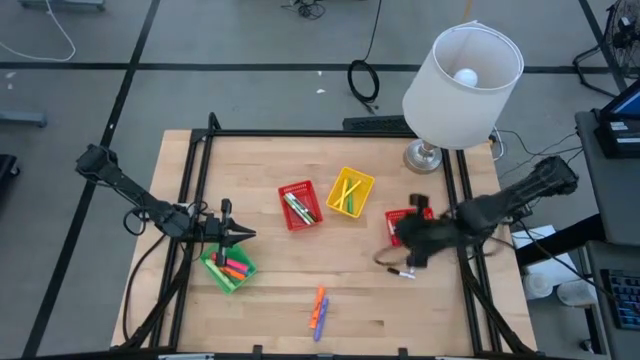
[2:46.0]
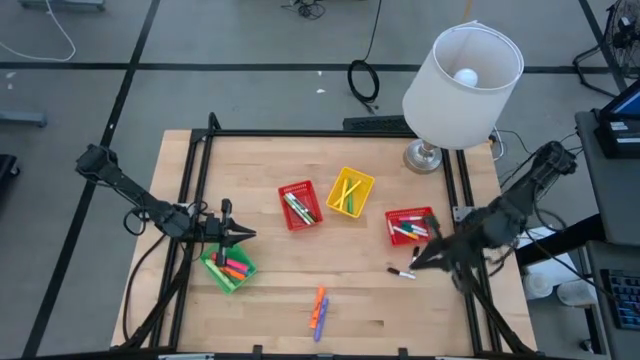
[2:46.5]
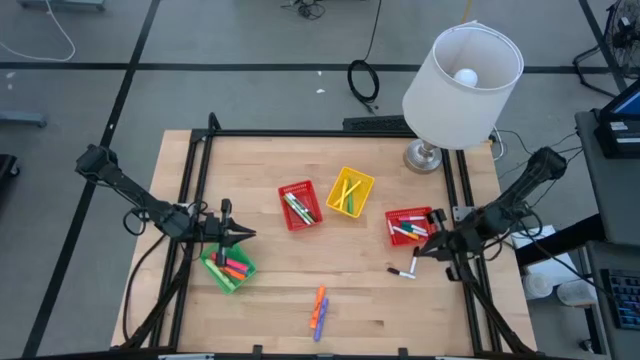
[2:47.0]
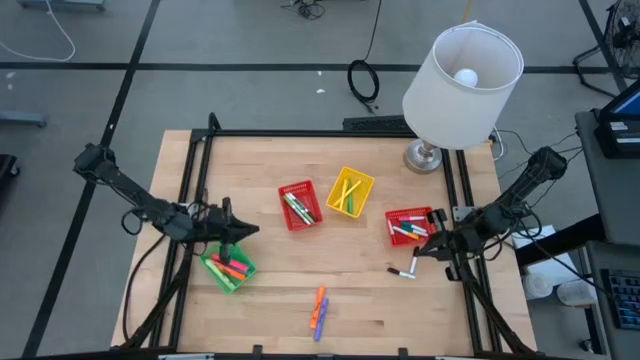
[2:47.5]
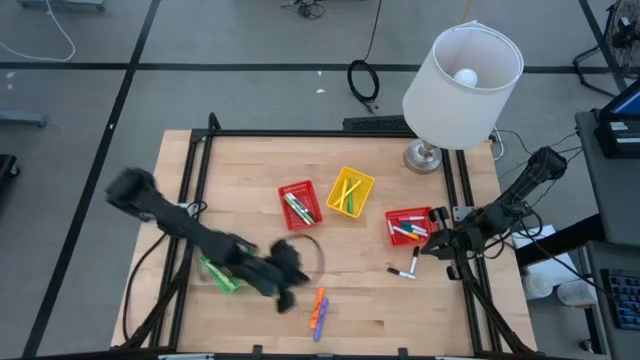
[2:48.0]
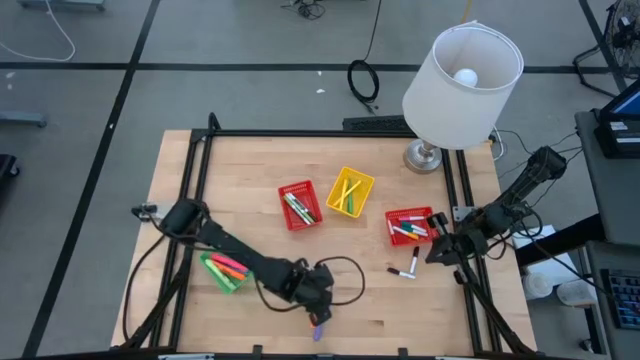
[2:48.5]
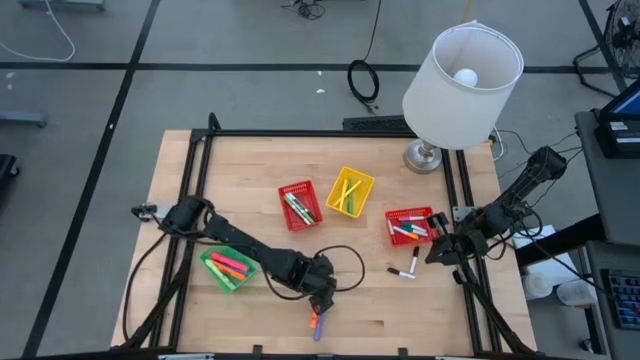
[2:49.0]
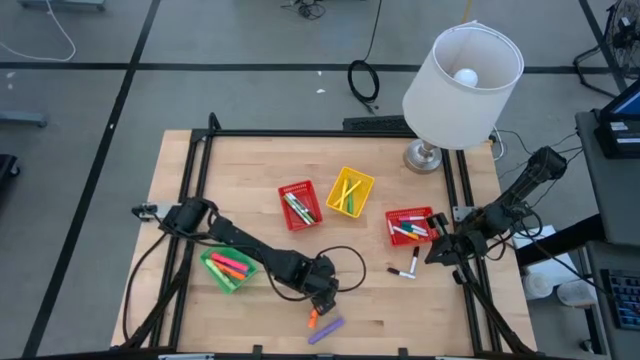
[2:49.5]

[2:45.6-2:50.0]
Task: Pick & Place Markers
Put the large orange highlighter pen into the green bin

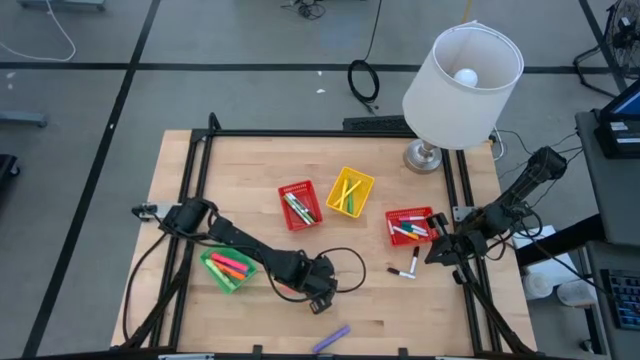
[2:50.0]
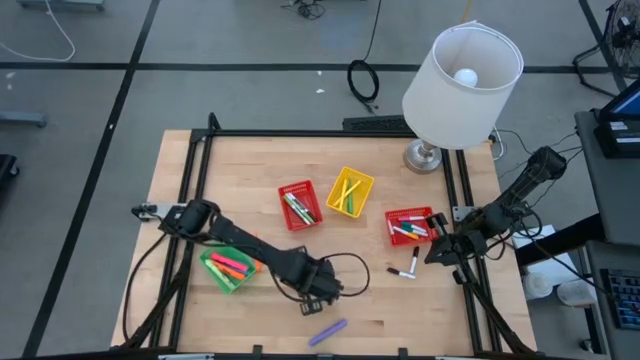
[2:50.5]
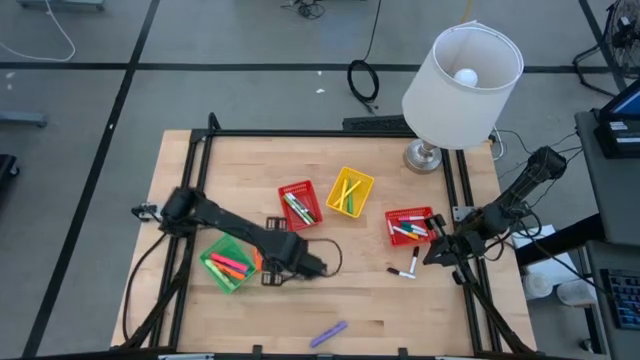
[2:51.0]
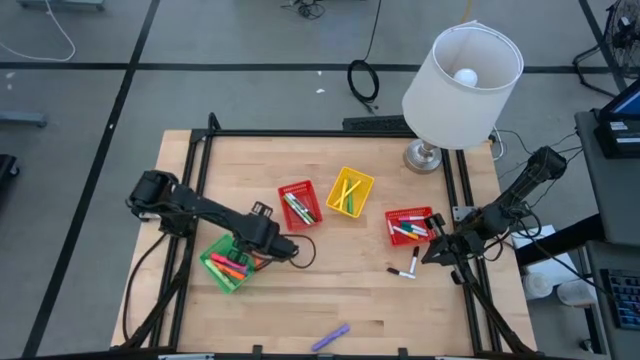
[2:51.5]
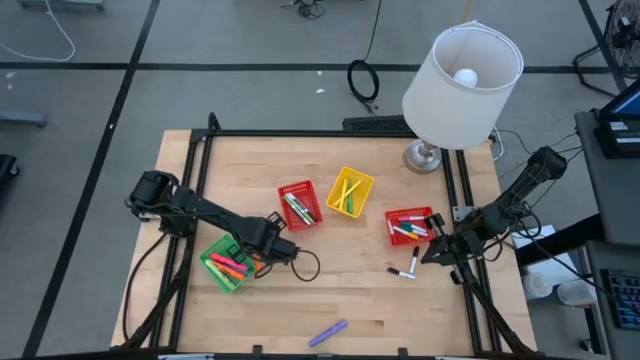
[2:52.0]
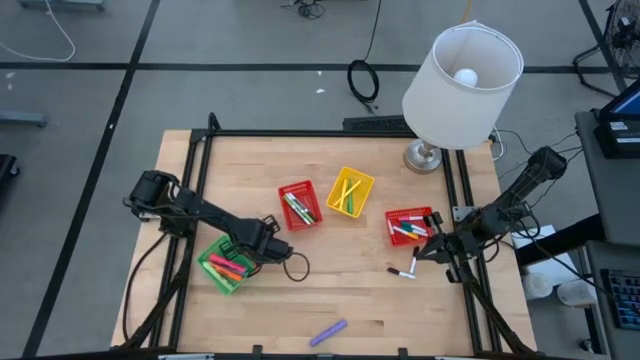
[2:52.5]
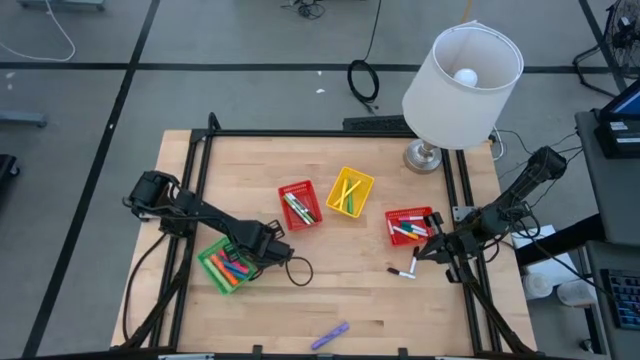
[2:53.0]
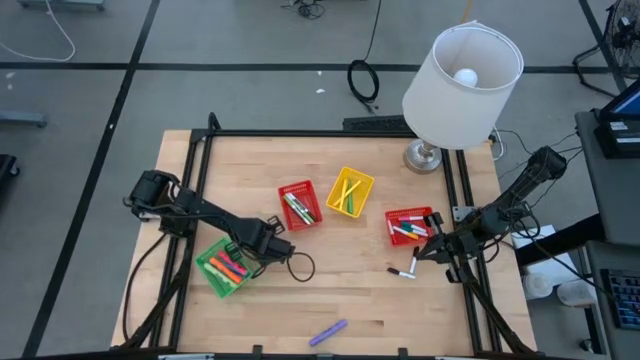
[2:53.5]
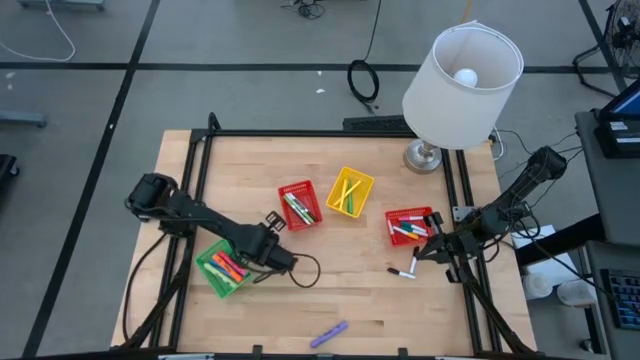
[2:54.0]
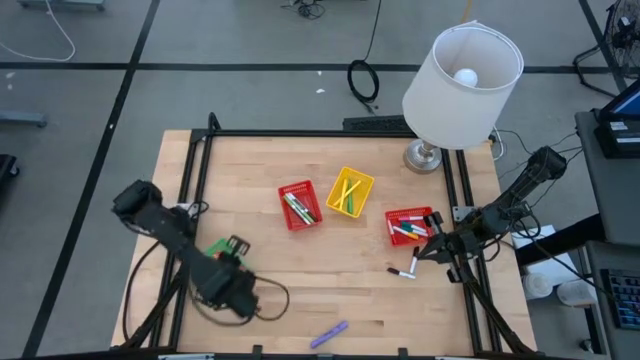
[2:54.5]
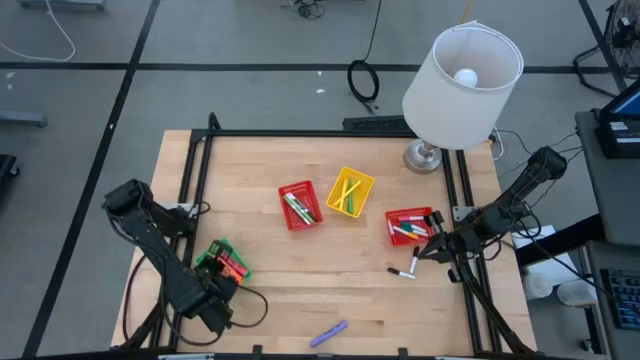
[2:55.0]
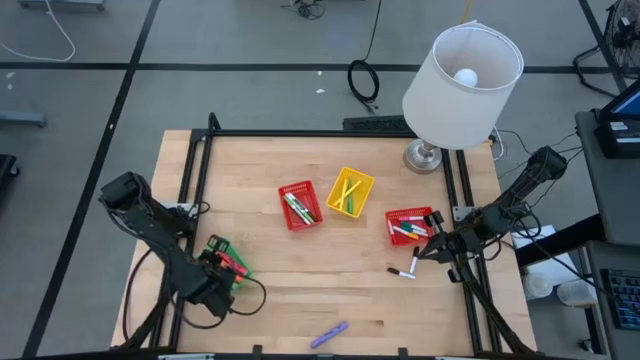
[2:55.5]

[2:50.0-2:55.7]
Put the large orange highlighter pen into the green bin

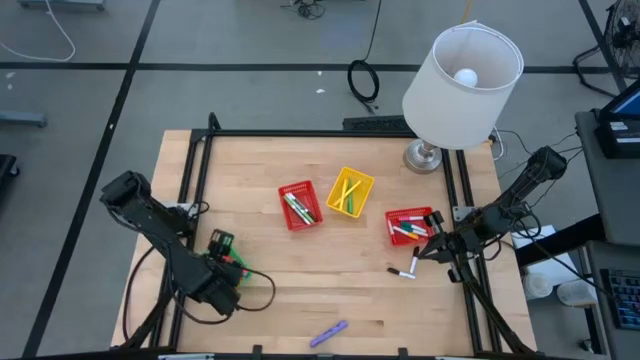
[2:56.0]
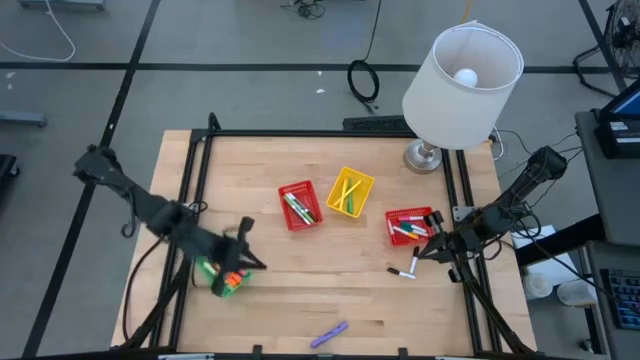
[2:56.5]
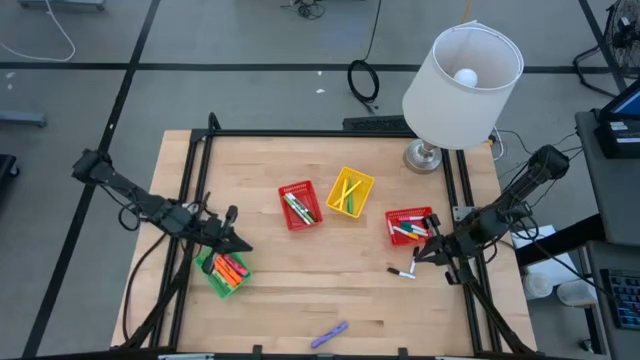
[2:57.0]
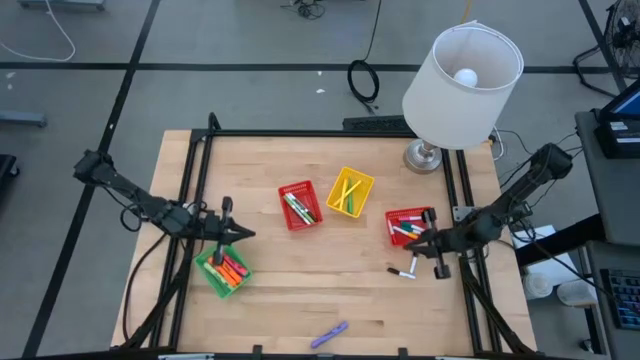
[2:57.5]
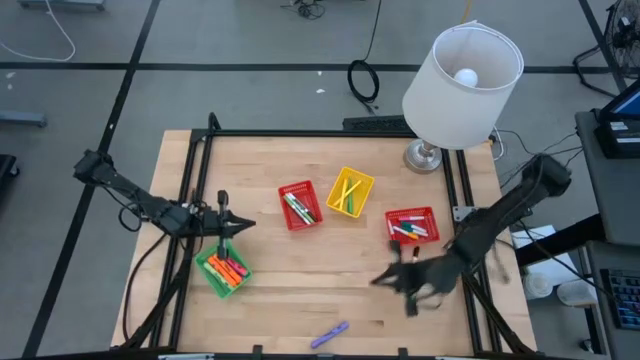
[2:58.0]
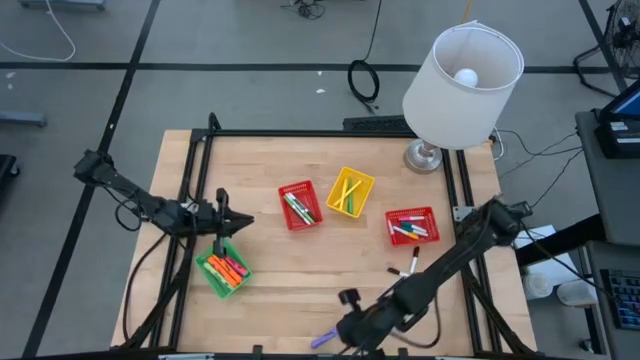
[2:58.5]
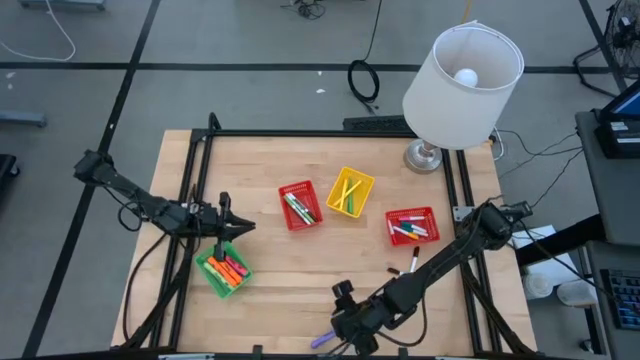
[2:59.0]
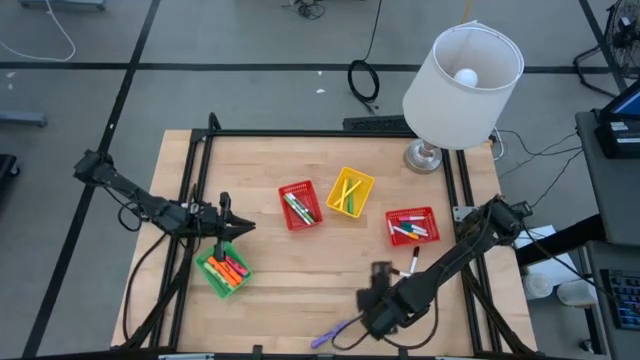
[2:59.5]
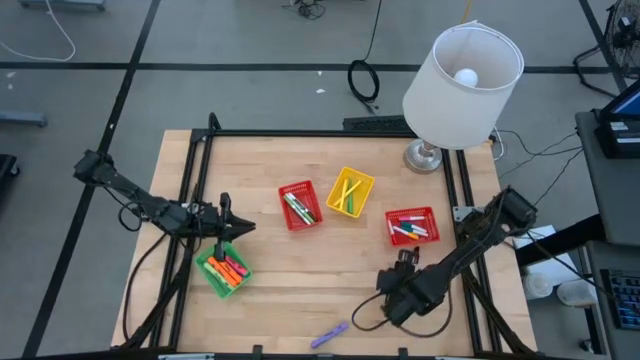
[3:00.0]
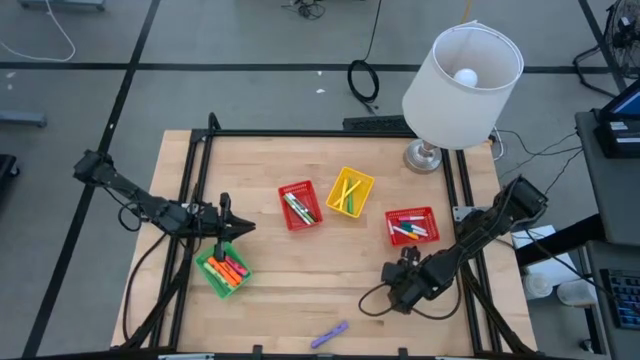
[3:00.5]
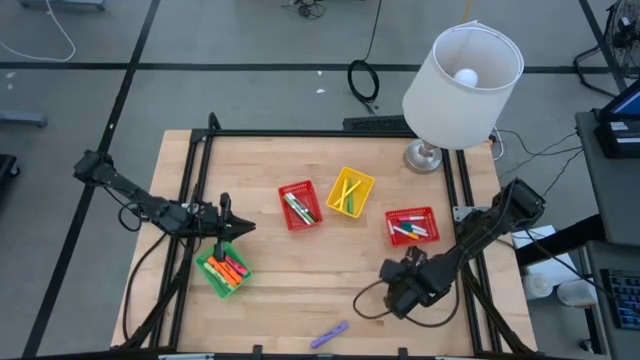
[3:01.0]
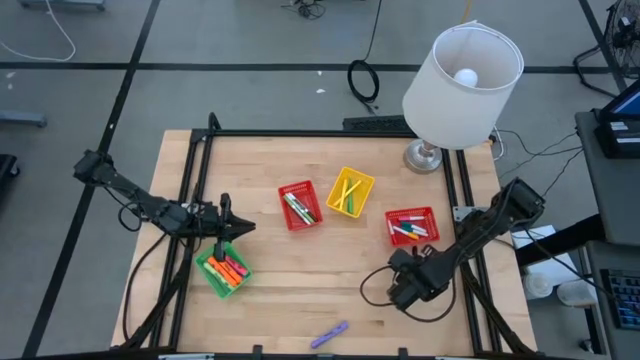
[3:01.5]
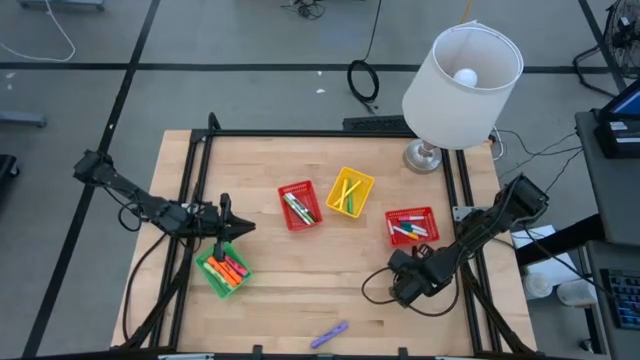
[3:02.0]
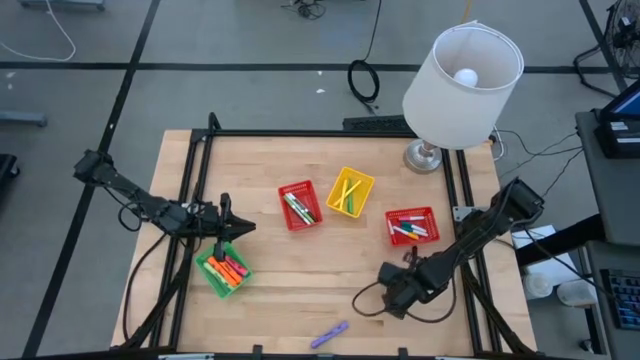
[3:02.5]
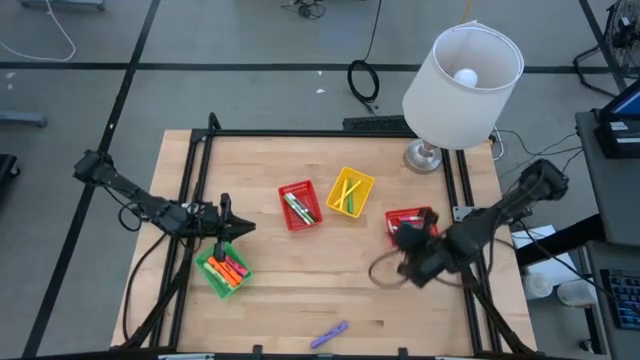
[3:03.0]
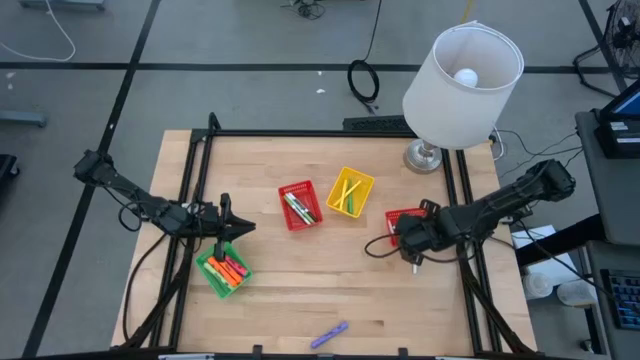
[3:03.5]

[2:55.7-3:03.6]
Put the bottom small black highlighter pen into the right red bin

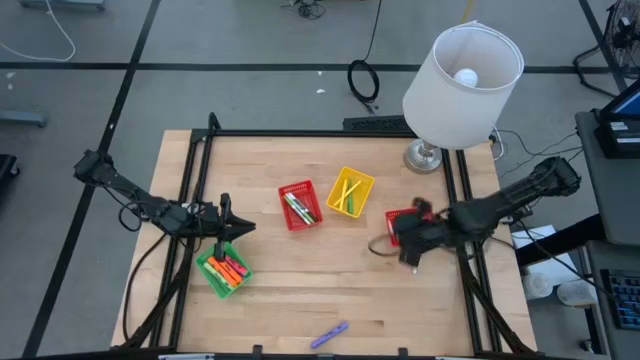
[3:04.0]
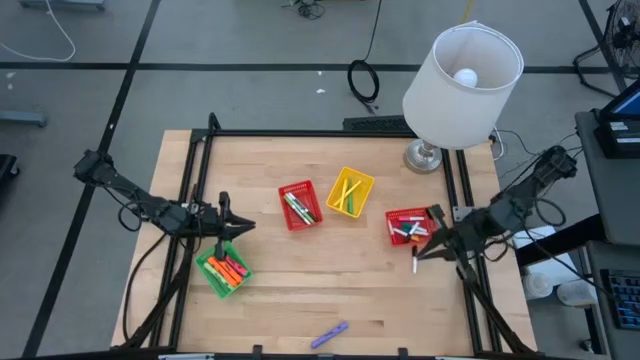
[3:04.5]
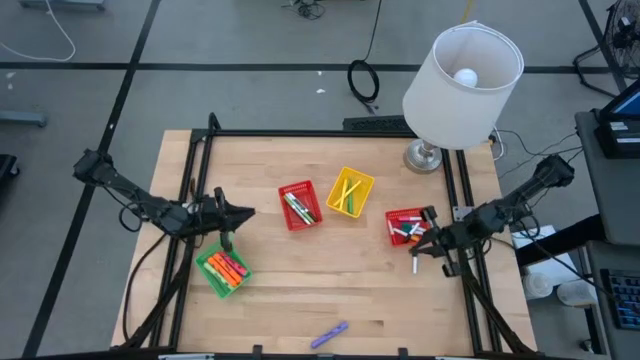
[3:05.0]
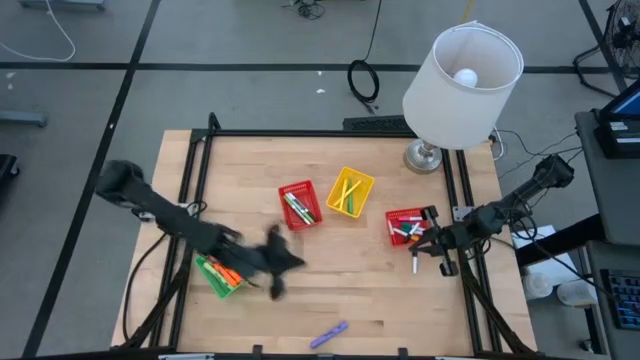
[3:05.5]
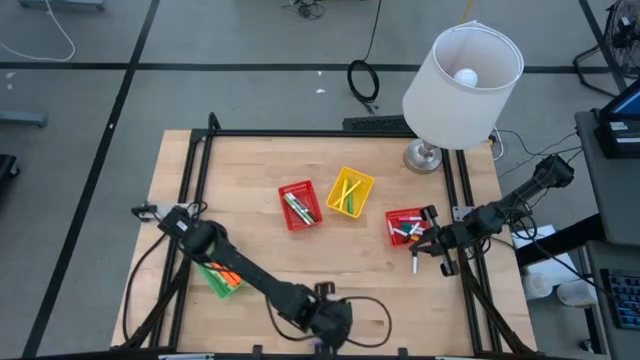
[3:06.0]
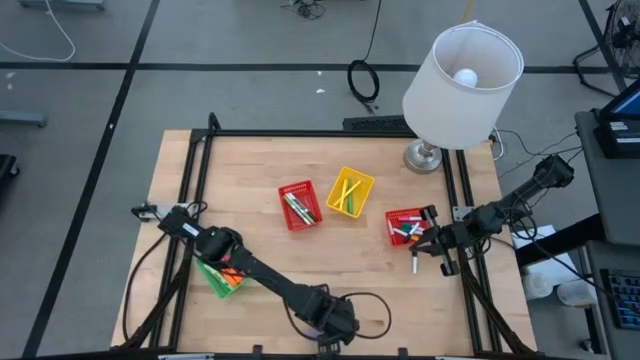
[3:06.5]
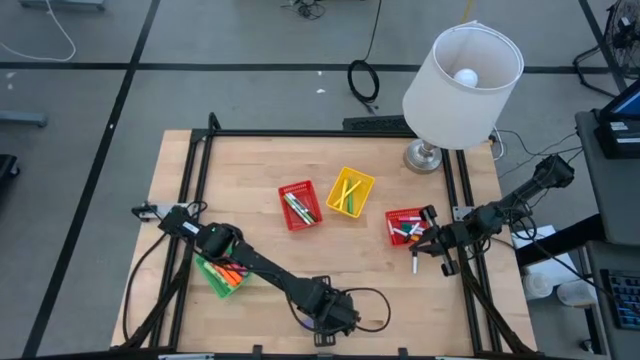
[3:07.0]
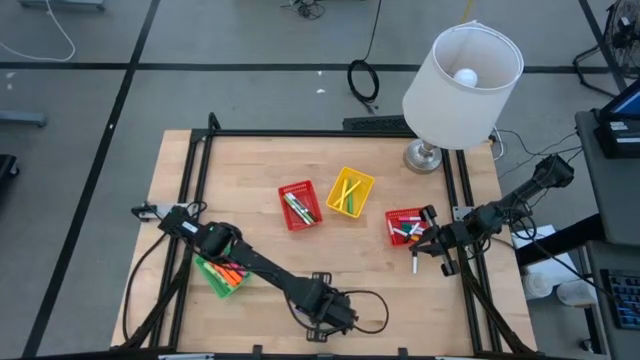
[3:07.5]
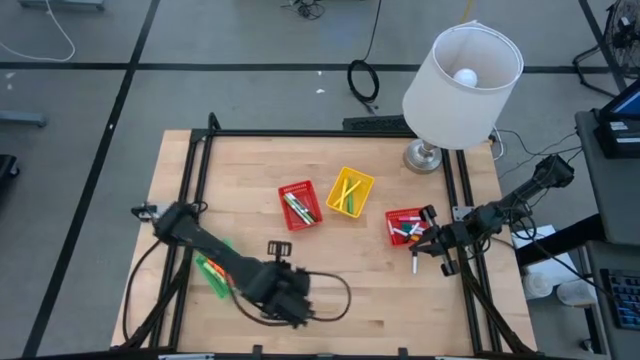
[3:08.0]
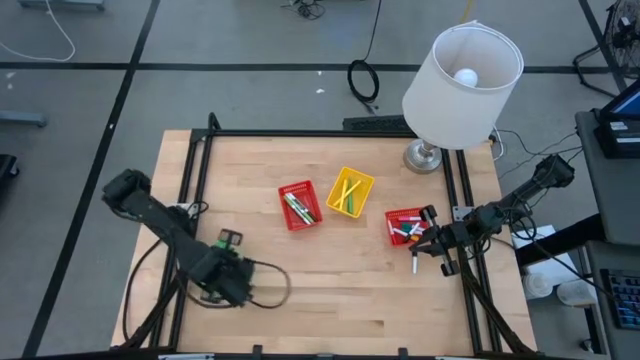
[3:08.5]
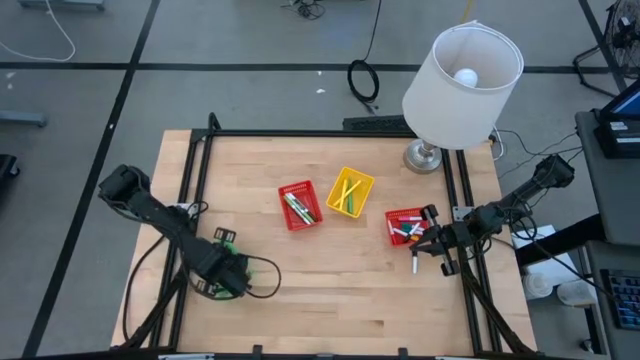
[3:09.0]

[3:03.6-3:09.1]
Put the large purple highlighter pen into the green bin
